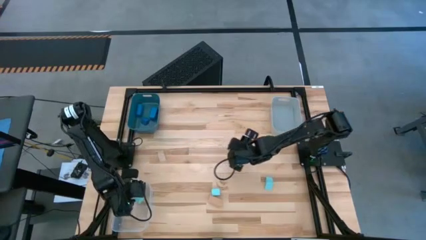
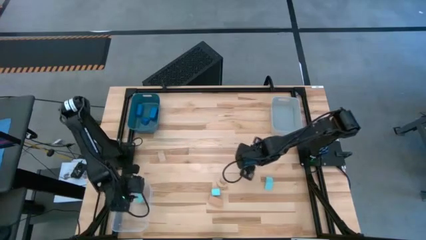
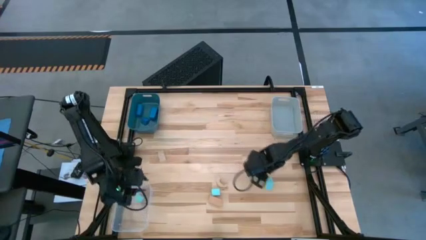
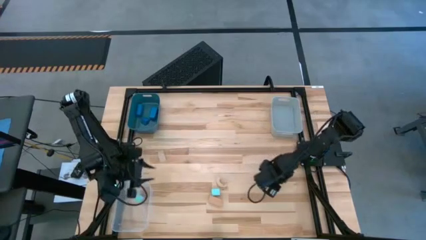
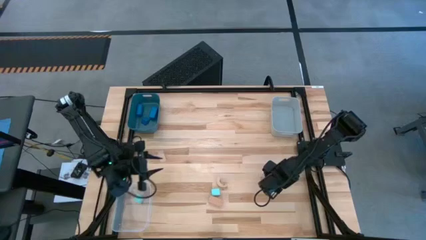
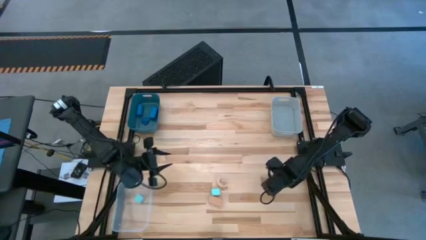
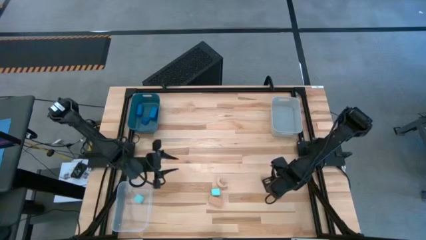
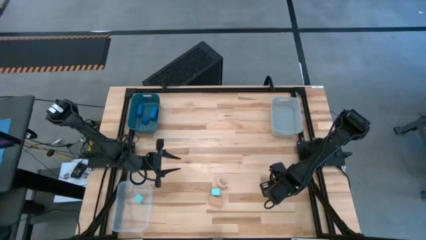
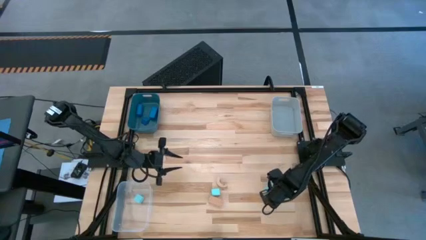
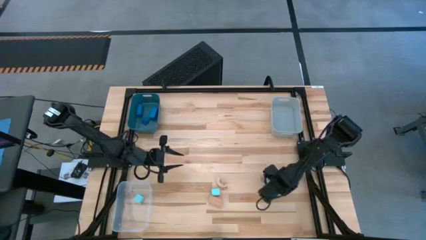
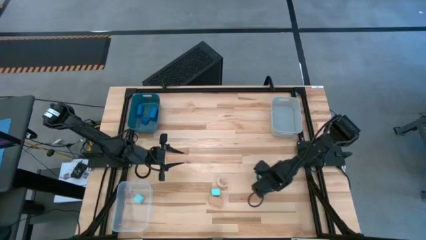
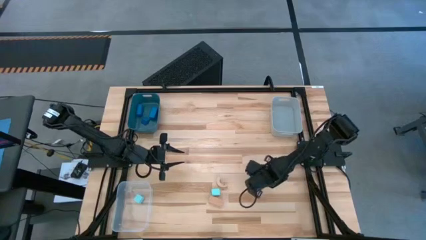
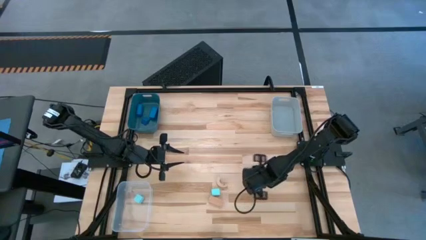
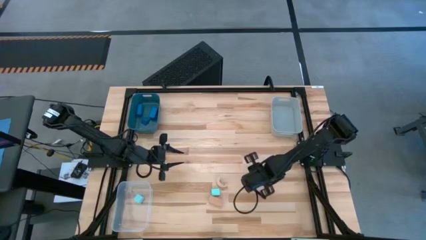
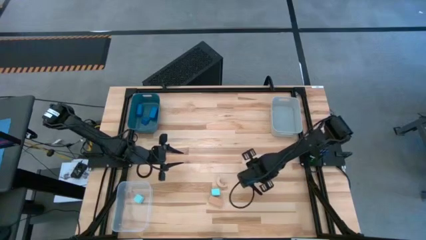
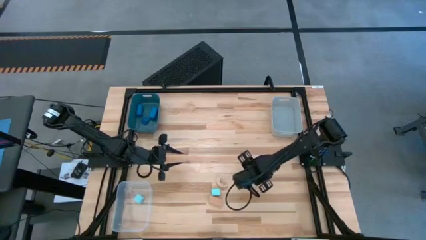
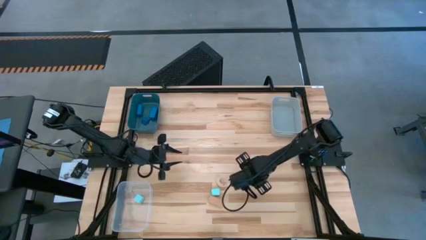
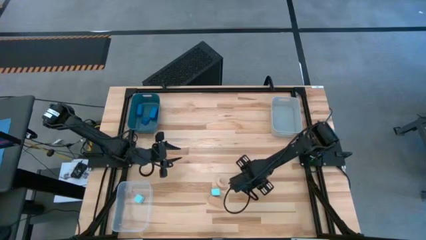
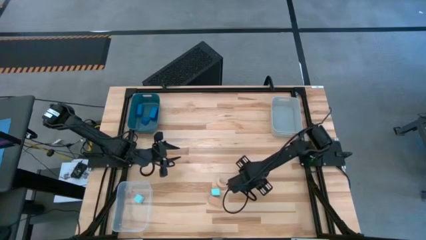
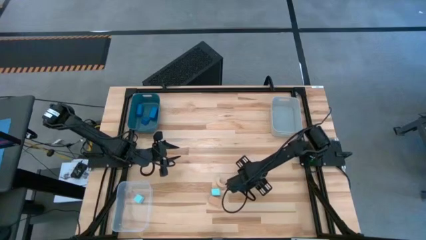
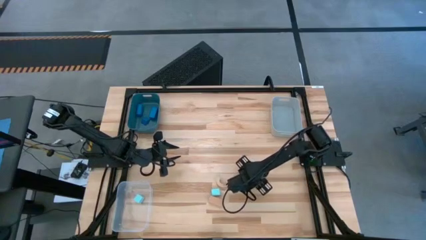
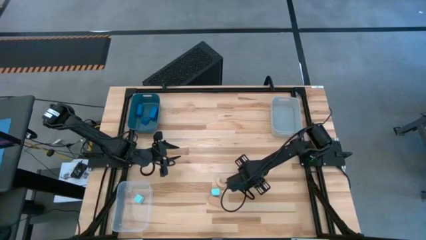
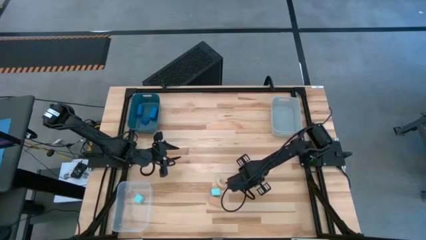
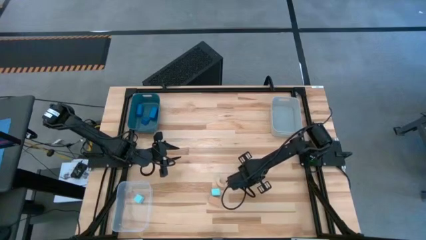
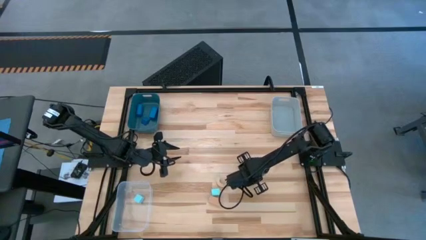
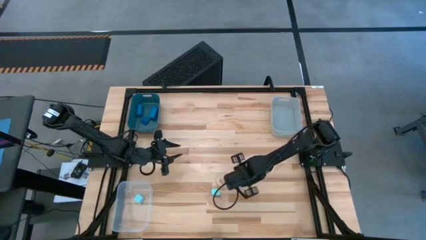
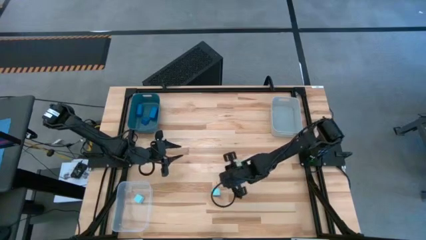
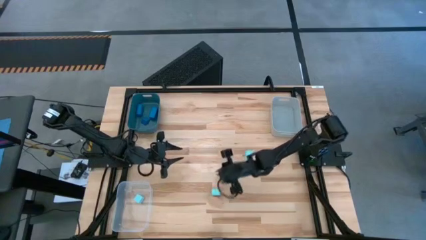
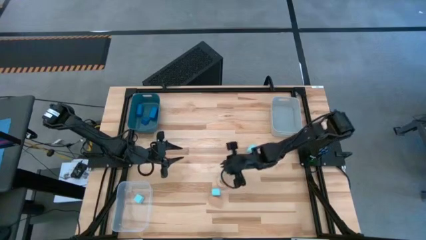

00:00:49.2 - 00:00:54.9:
Task: Sort & place blocks by color
Put the right light blue block into the transparent bin

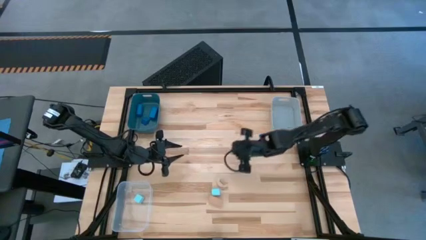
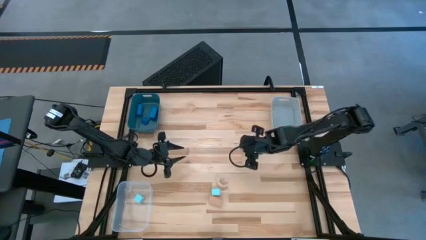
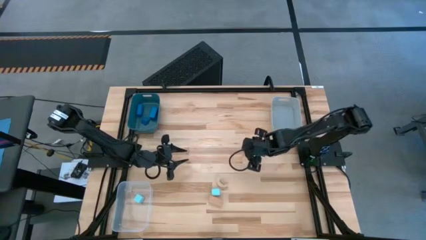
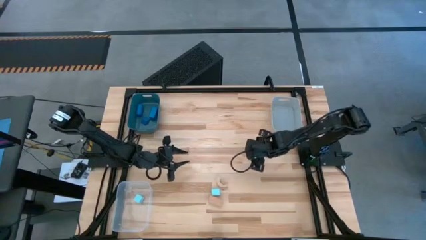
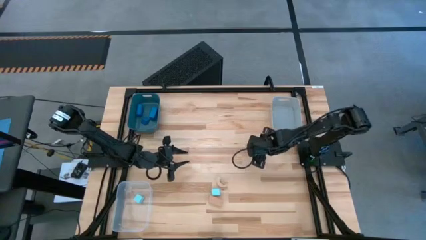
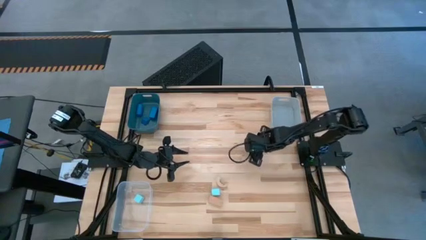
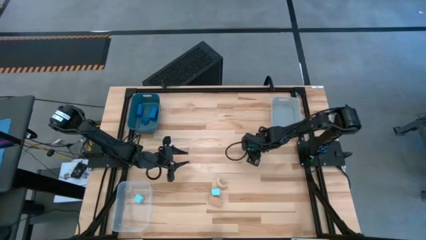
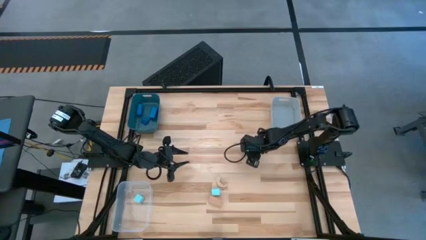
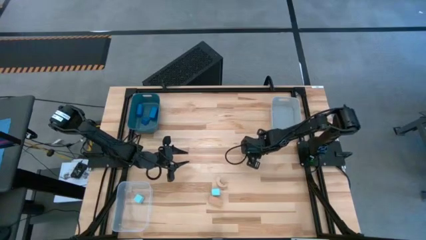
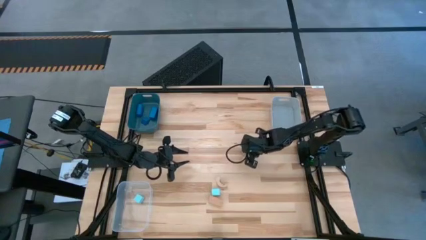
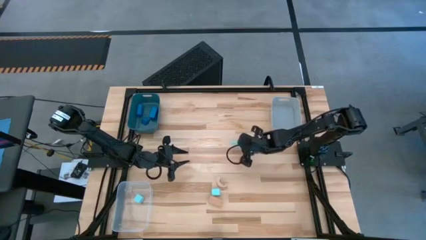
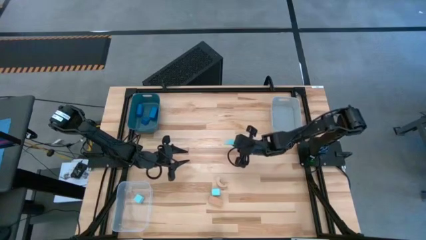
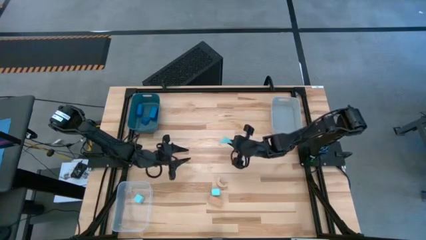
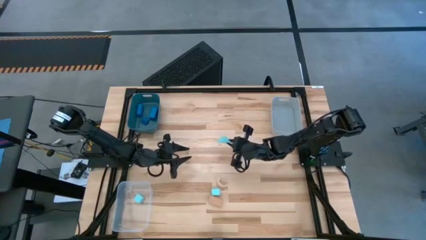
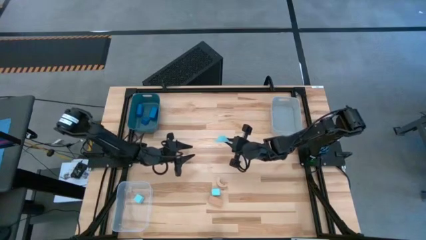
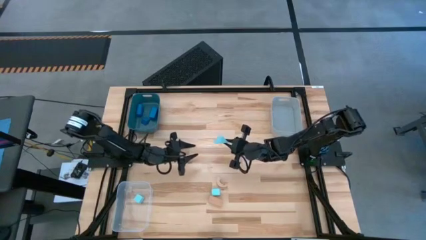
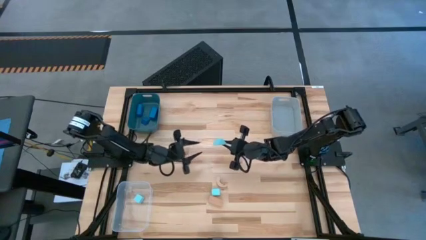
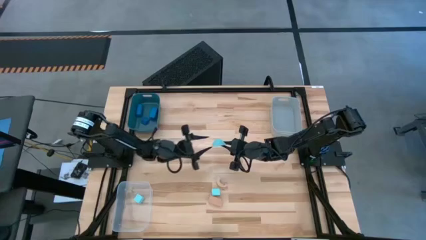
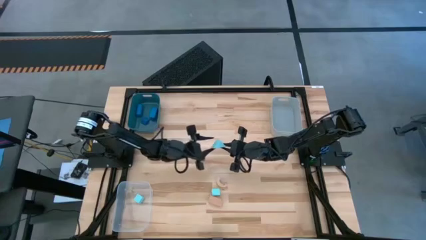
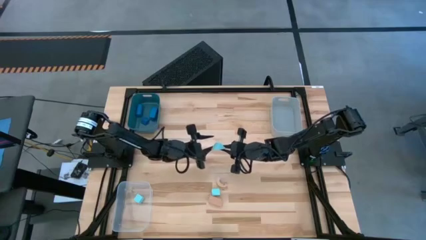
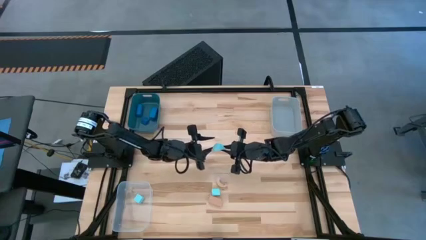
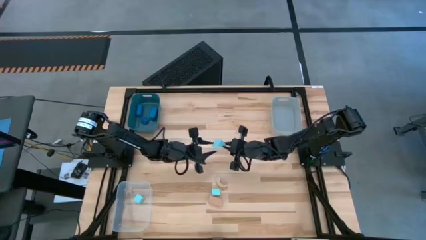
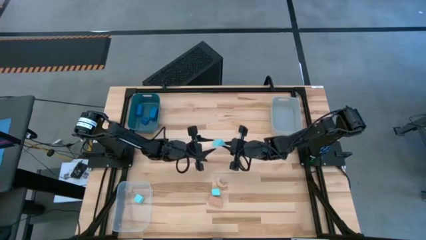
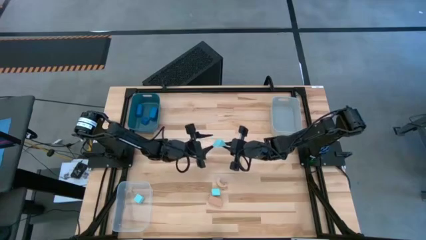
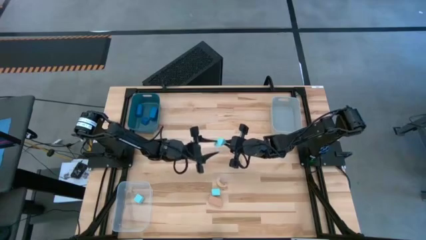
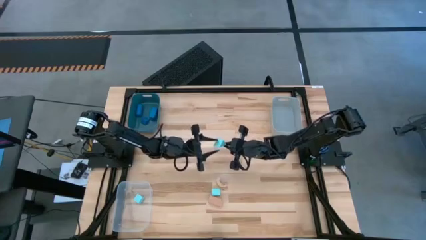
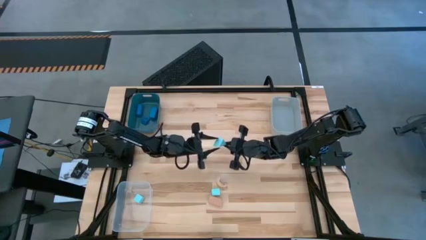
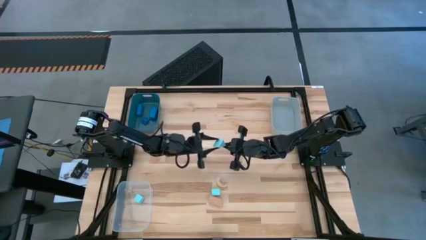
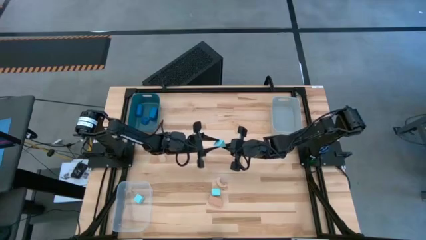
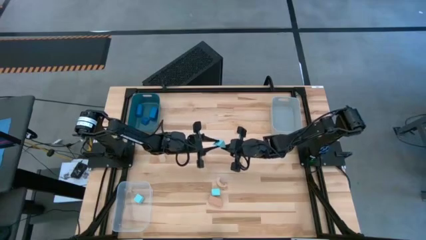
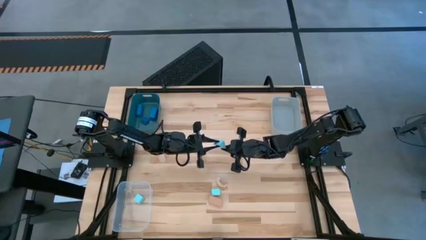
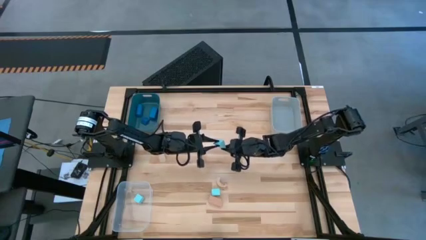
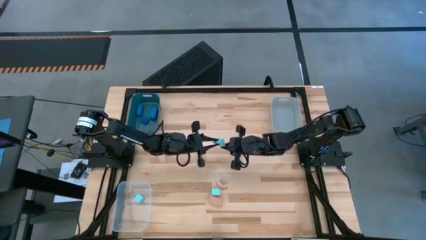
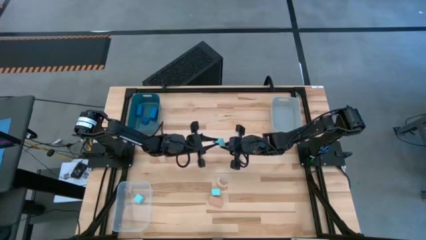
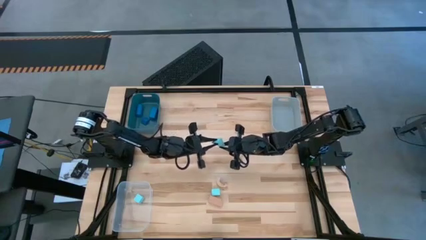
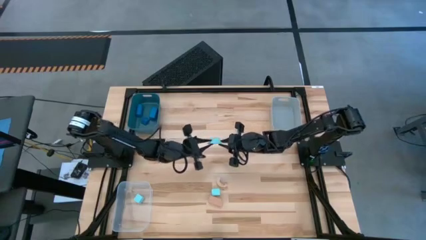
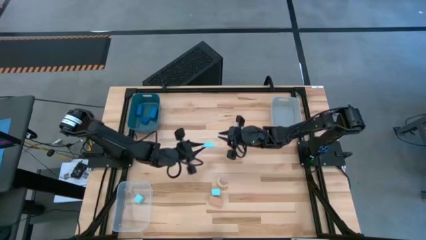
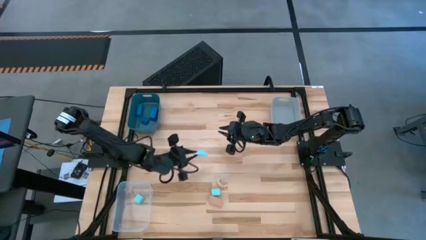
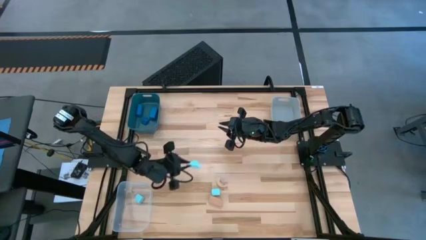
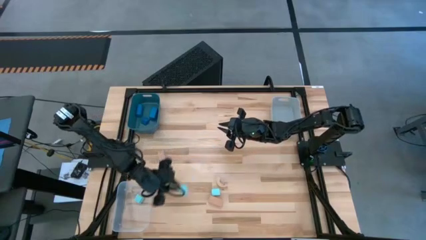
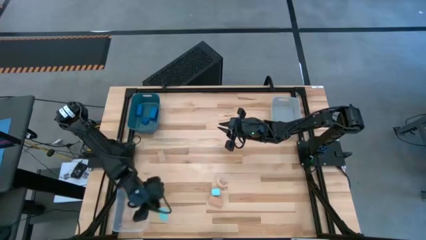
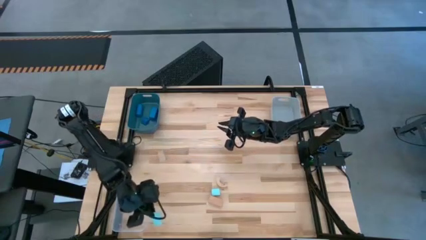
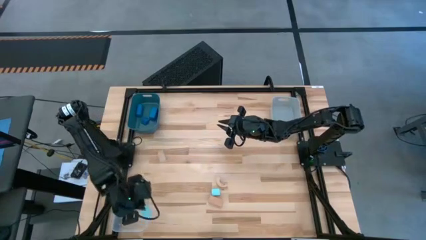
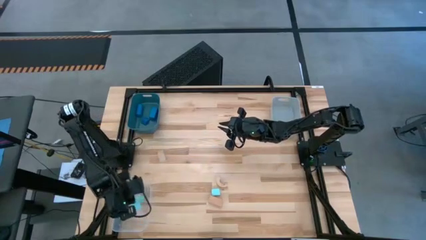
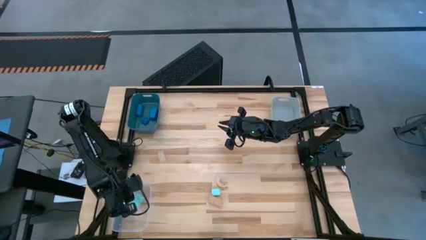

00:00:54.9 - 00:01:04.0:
Put the right light blue block into the transparent bin

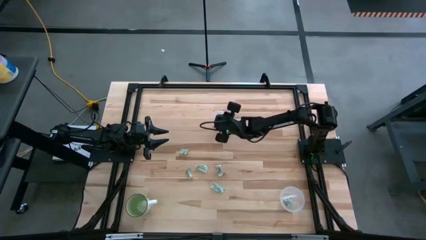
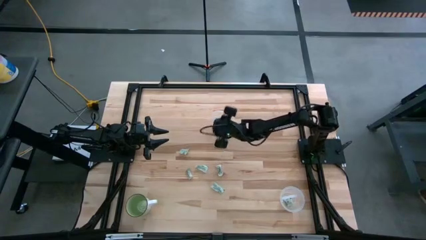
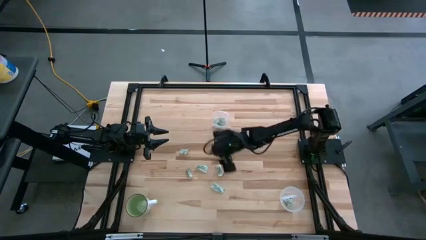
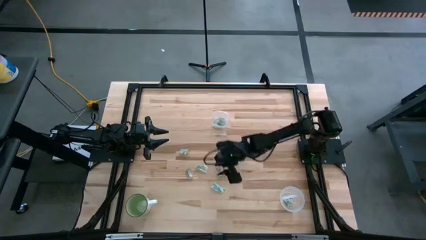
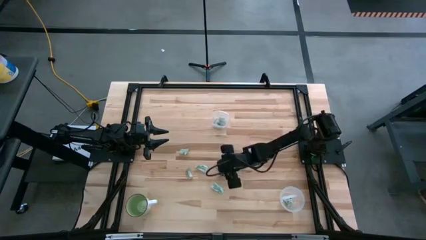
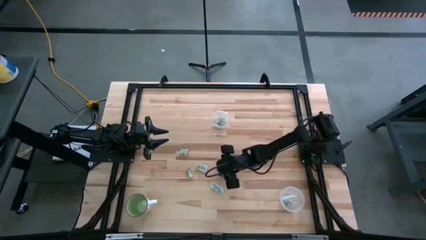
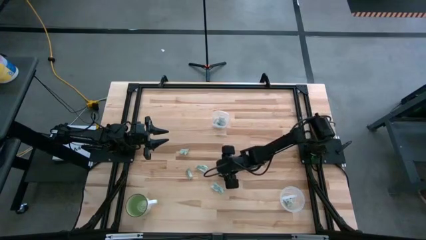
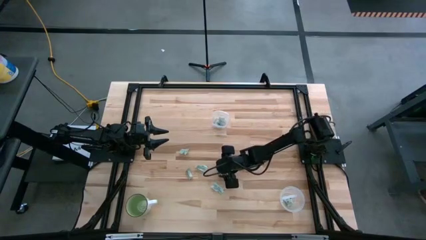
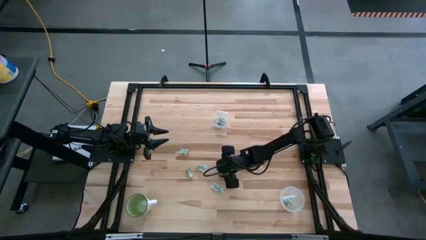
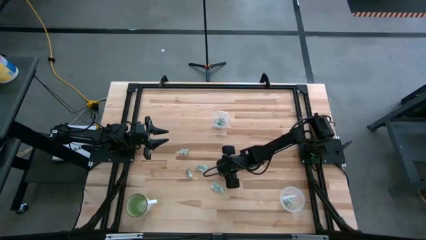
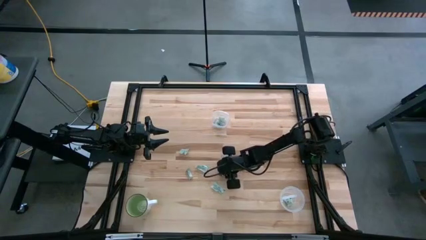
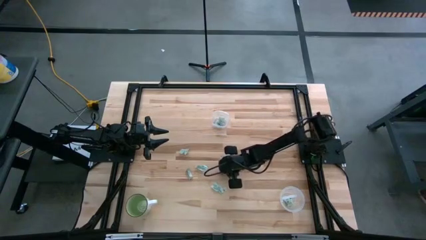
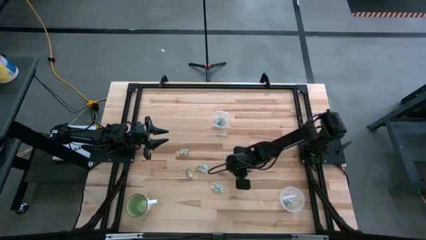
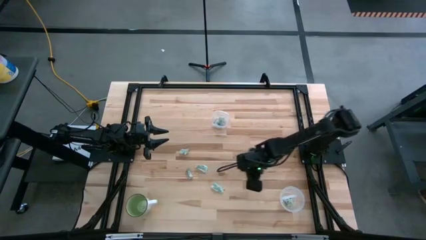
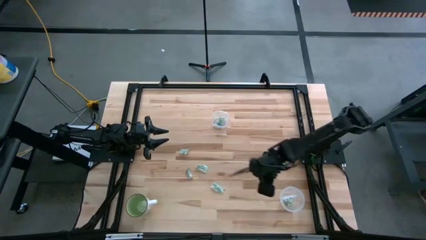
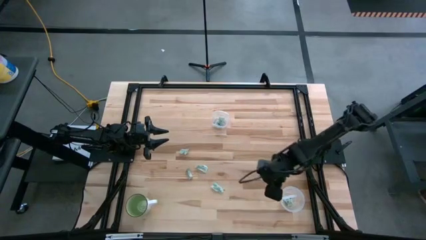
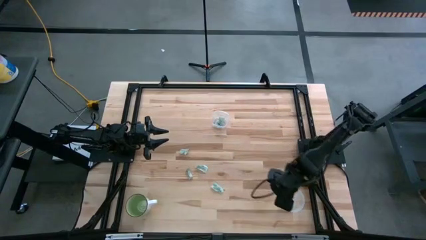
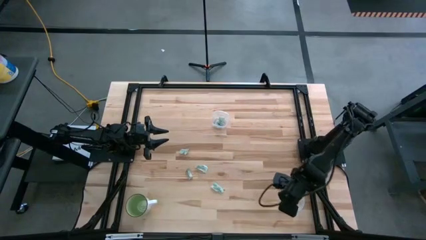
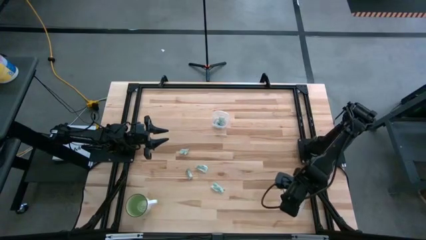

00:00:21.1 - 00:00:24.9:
Task: Pick and place items into bin
Put the green stevia packet into the circle transparent bin
